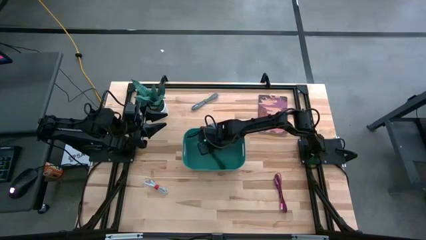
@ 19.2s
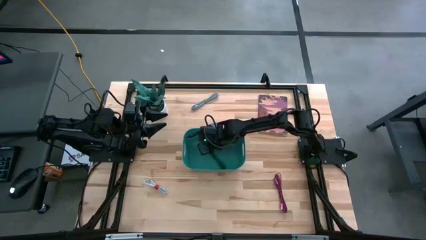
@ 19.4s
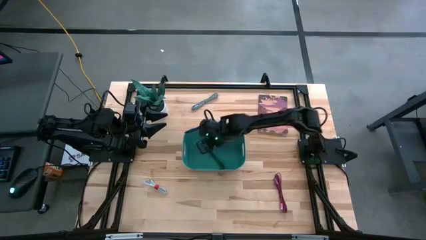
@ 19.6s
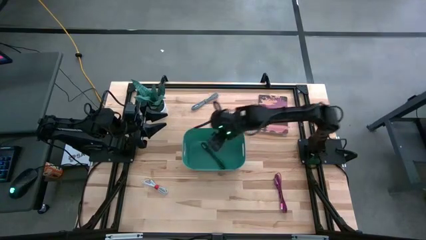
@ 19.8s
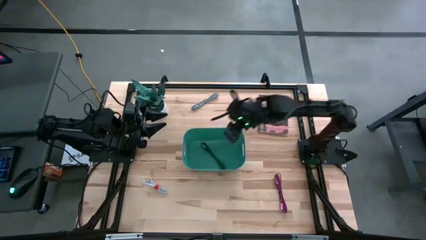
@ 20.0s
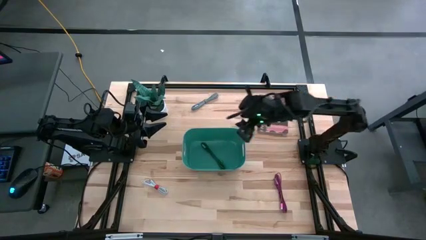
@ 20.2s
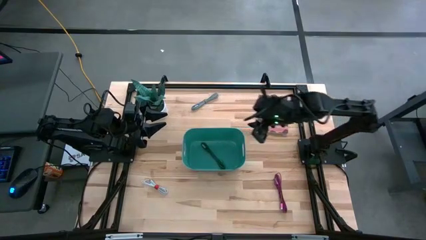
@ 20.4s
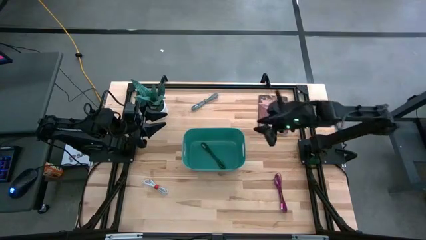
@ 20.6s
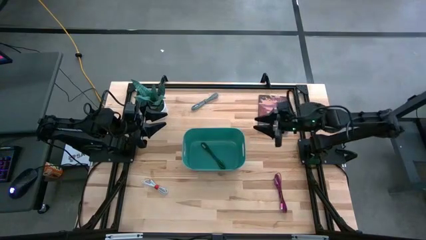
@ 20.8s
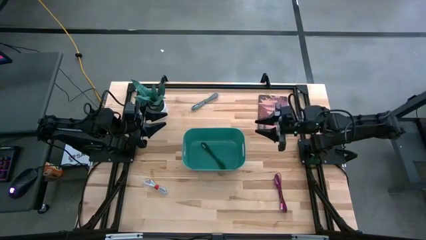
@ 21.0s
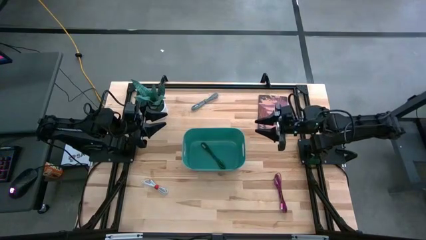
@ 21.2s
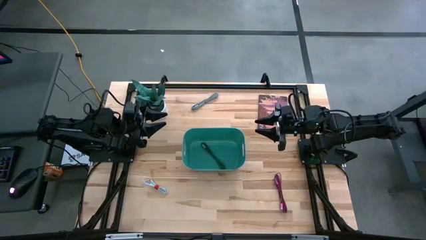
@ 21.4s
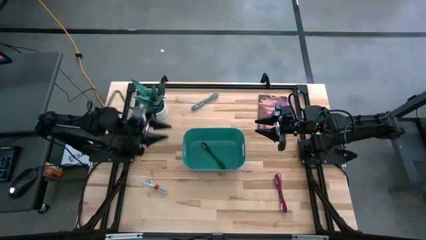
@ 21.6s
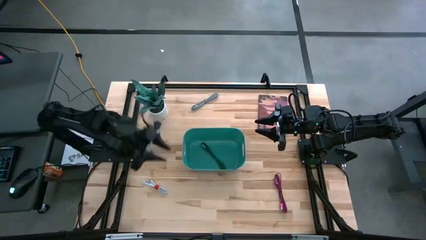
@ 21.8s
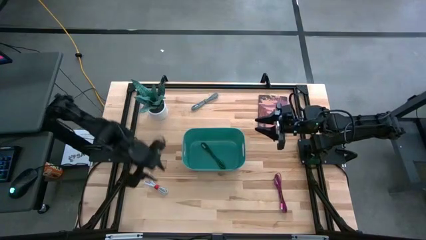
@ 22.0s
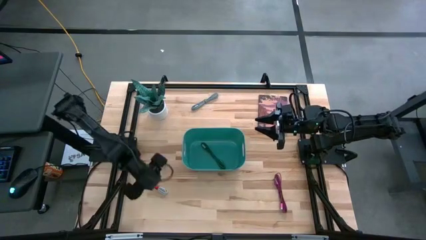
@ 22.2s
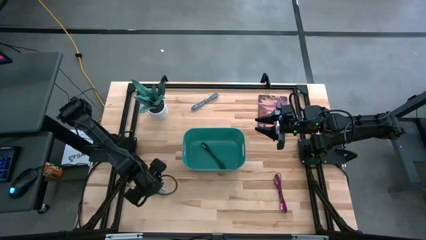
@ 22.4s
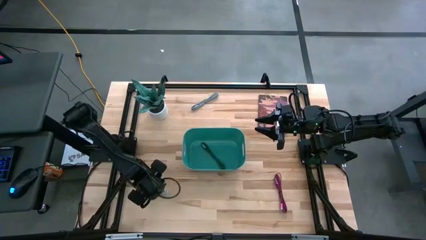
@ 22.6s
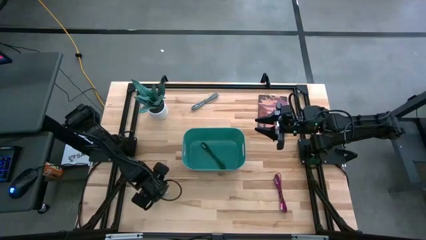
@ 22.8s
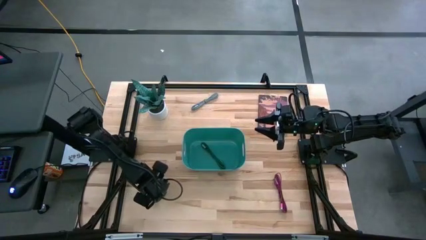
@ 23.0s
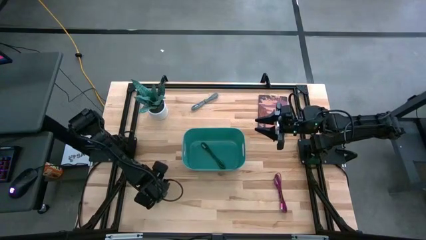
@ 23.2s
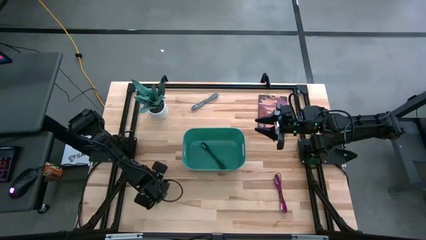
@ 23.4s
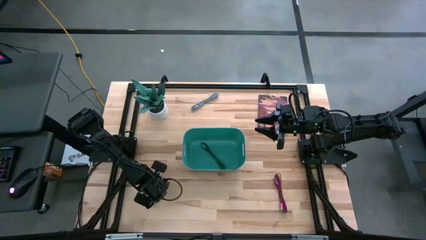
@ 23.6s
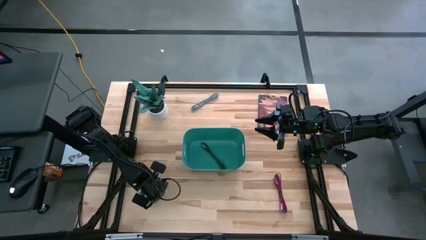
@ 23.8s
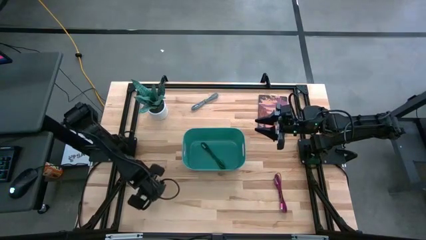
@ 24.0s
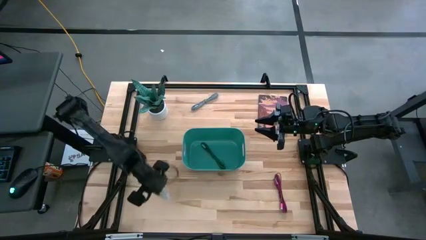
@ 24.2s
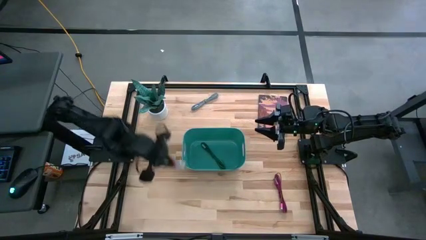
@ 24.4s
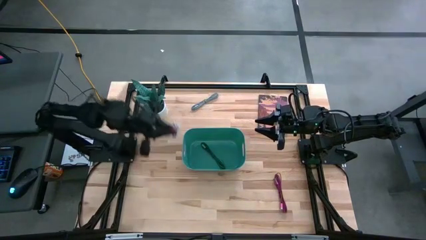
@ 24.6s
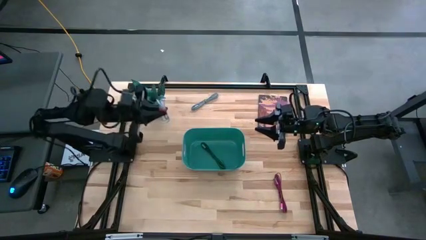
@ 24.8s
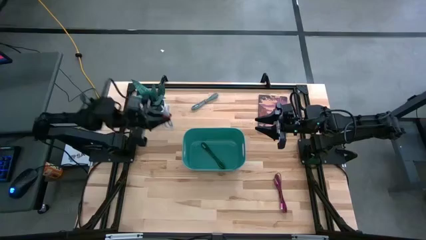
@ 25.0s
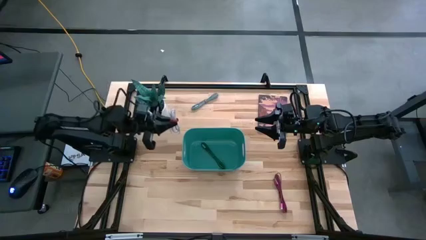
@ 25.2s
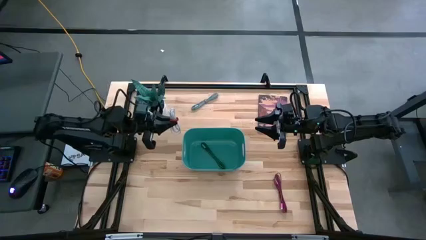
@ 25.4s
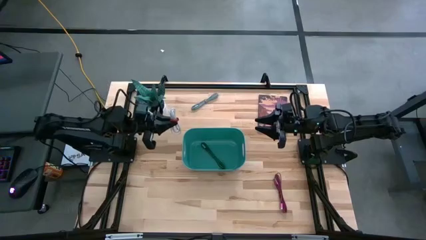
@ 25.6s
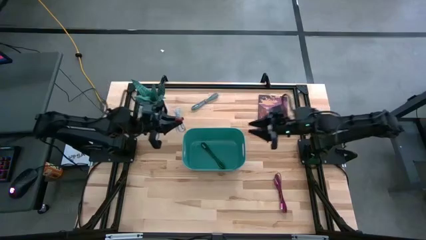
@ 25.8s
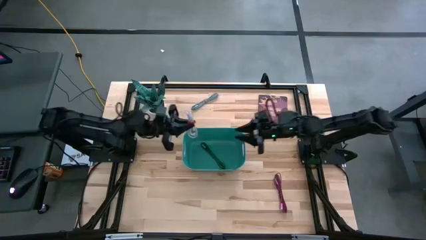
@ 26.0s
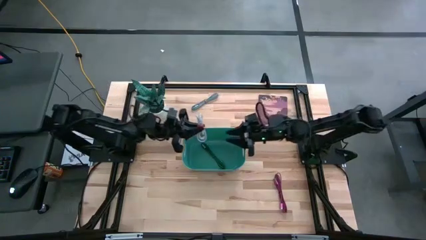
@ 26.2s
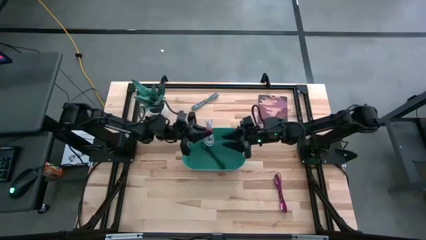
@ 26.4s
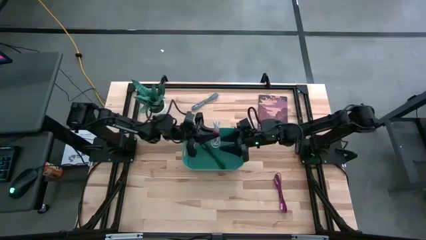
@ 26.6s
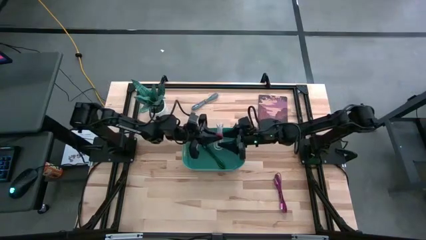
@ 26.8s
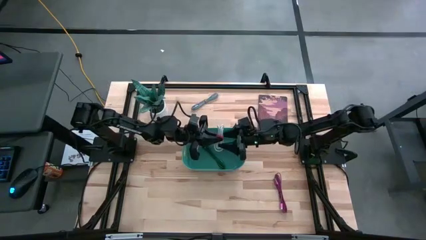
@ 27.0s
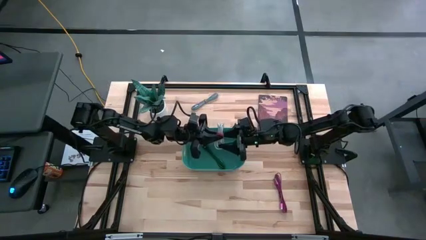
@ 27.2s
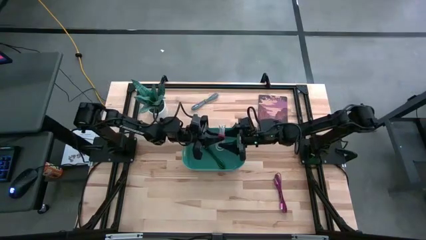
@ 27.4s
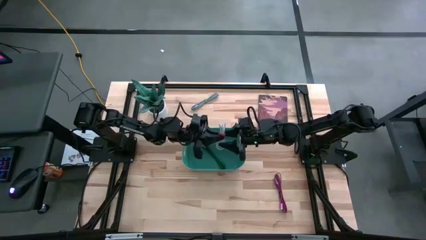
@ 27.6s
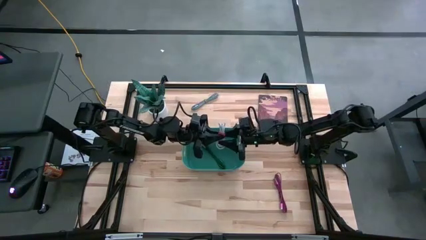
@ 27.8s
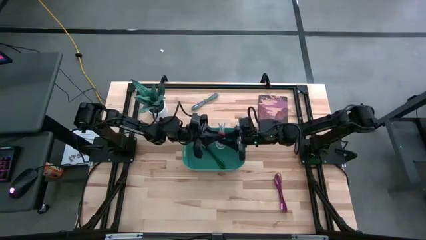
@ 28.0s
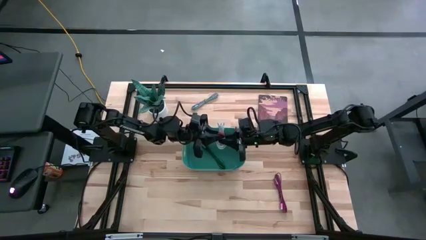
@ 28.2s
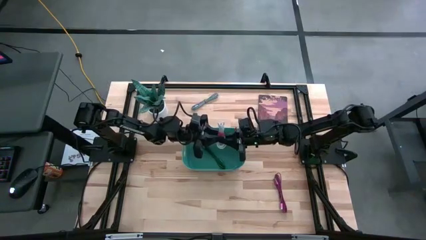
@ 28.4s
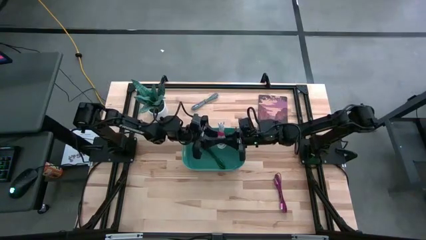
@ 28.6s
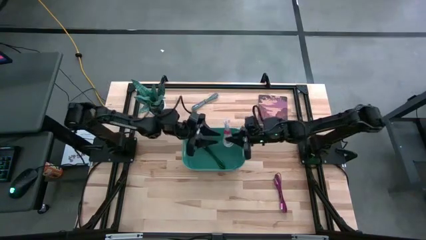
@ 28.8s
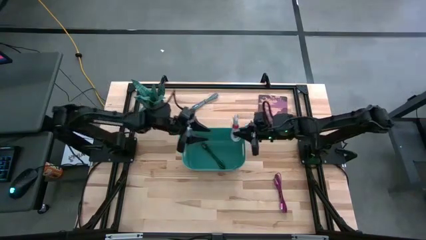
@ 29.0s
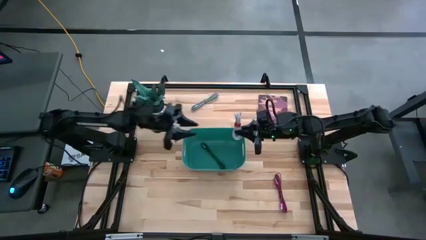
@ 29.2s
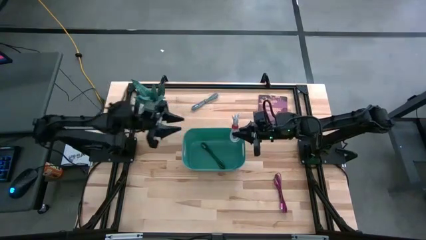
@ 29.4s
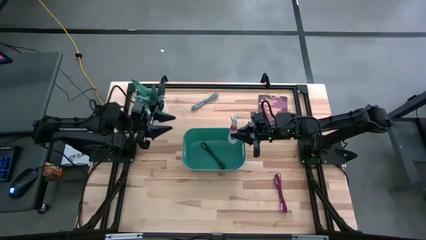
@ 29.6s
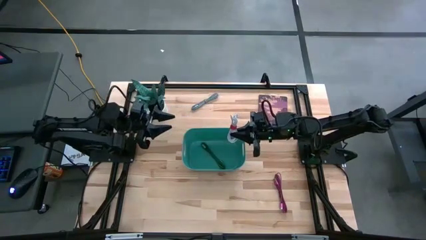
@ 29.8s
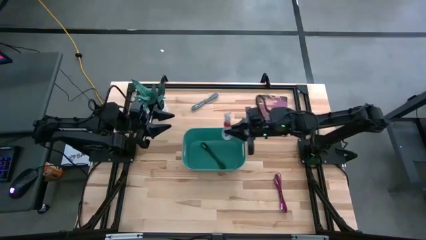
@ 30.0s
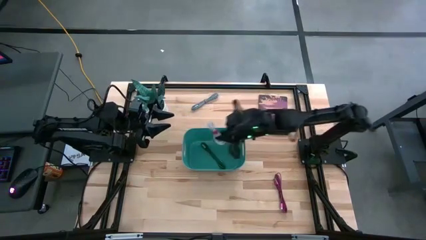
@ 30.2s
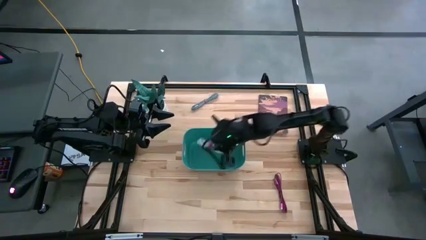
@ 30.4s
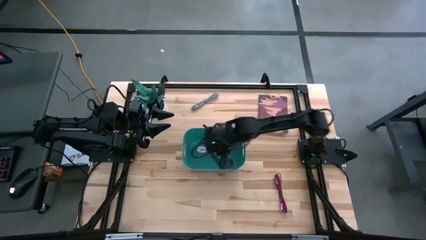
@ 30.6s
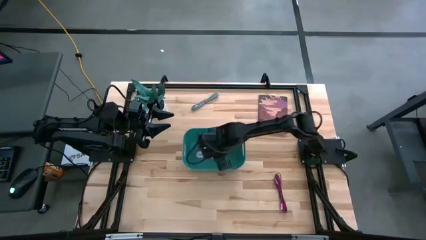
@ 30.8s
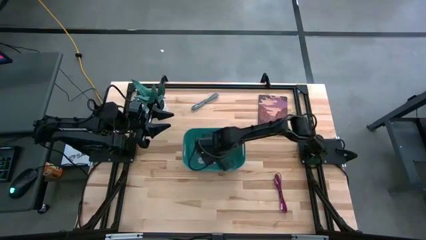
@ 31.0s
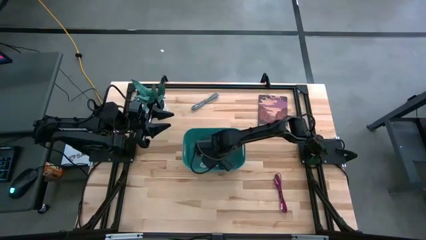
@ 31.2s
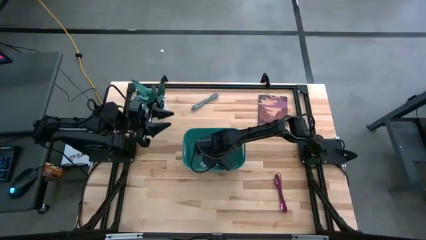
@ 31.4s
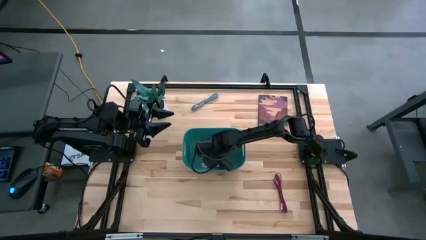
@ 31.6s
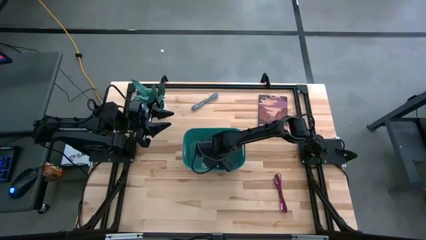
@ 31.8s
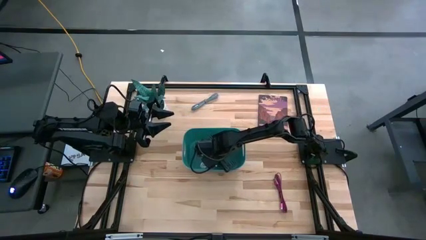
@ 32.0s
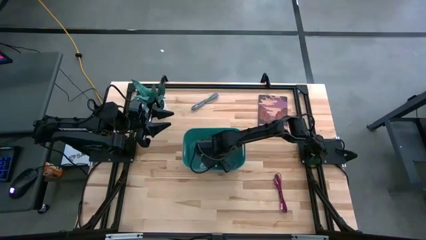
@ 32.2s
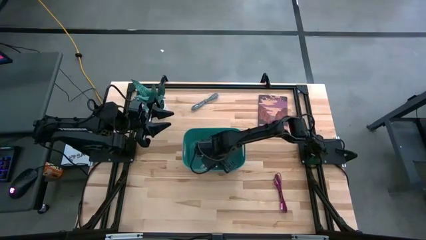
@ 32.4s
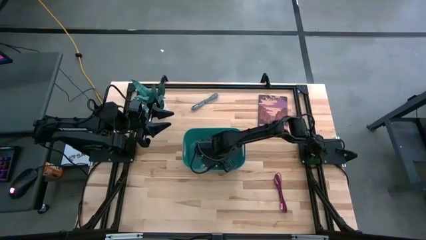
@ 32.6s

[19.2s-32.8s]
Task: Pick and place USB-C Cables
Put the white charger cable into the green bin
